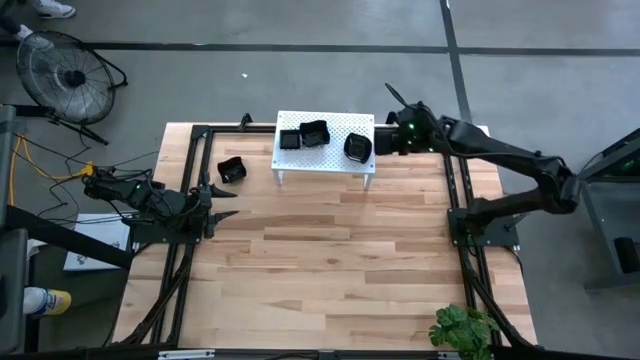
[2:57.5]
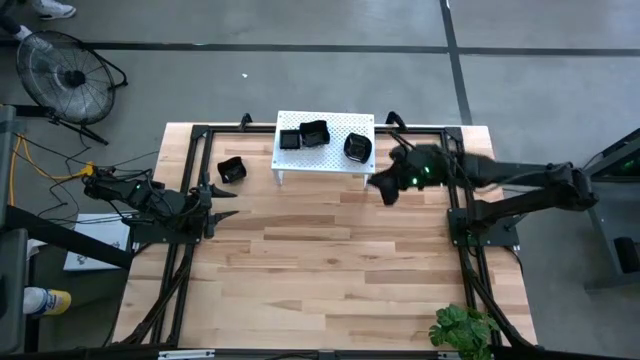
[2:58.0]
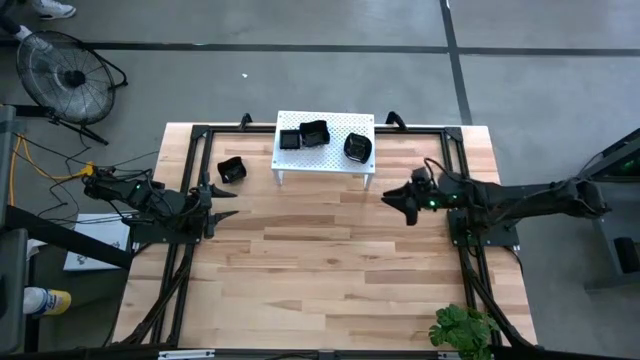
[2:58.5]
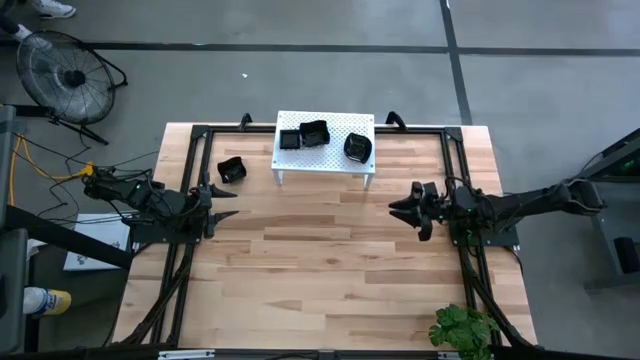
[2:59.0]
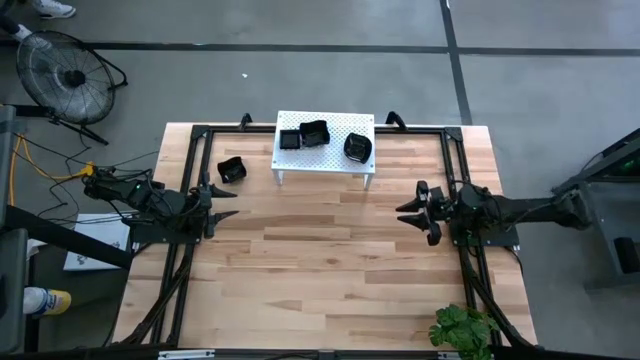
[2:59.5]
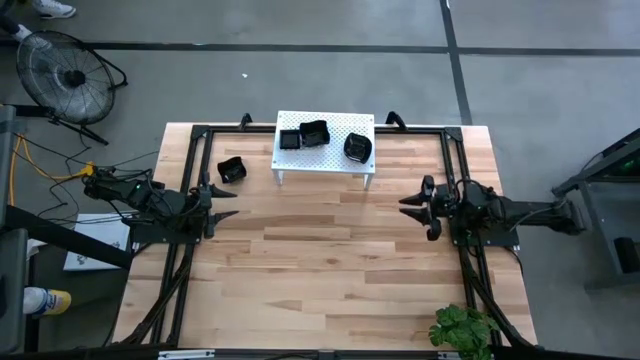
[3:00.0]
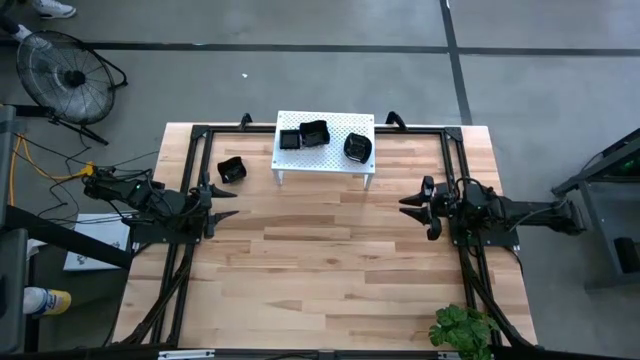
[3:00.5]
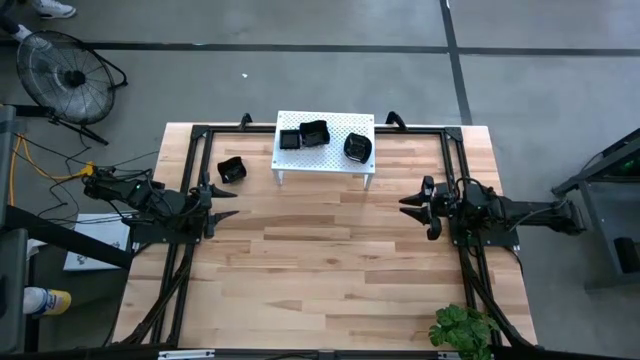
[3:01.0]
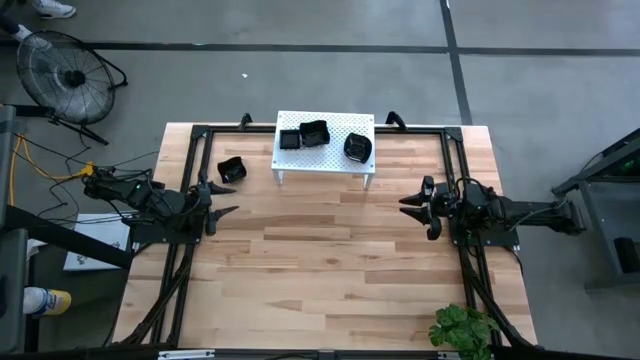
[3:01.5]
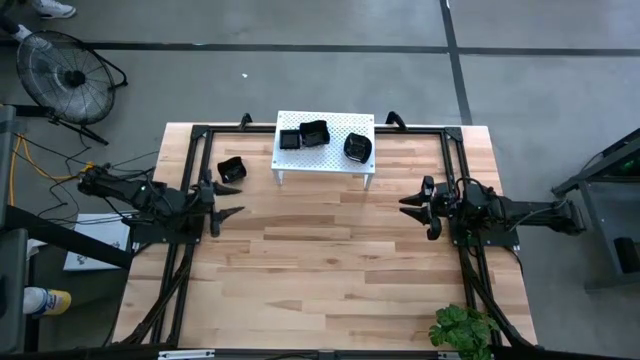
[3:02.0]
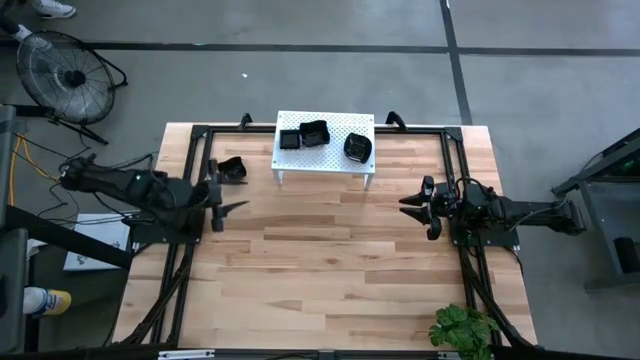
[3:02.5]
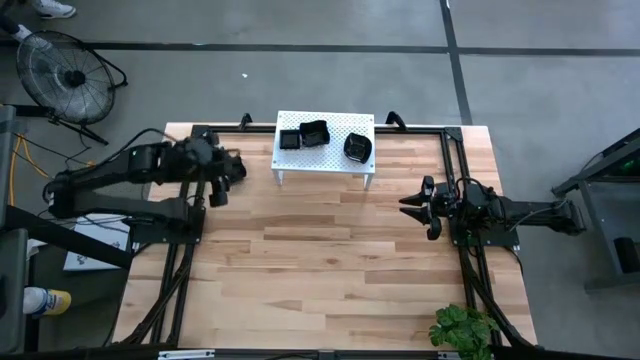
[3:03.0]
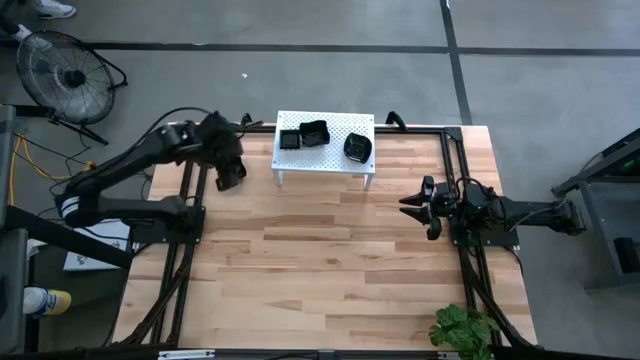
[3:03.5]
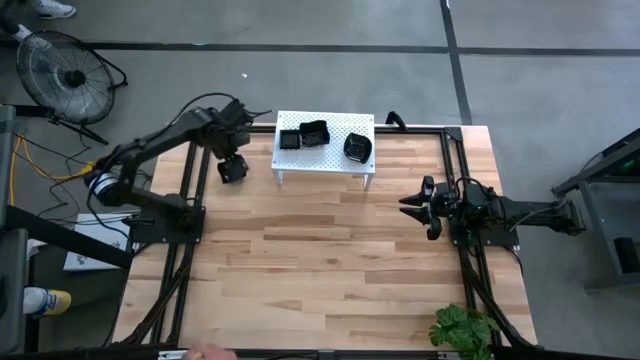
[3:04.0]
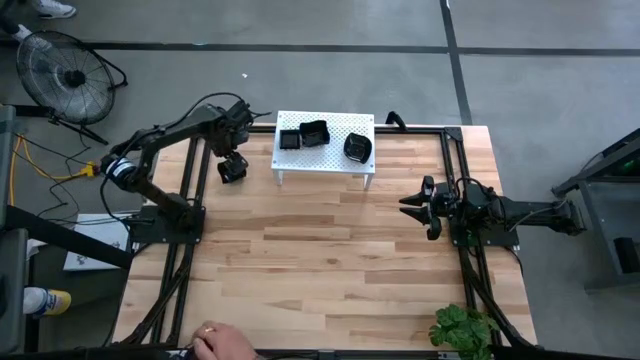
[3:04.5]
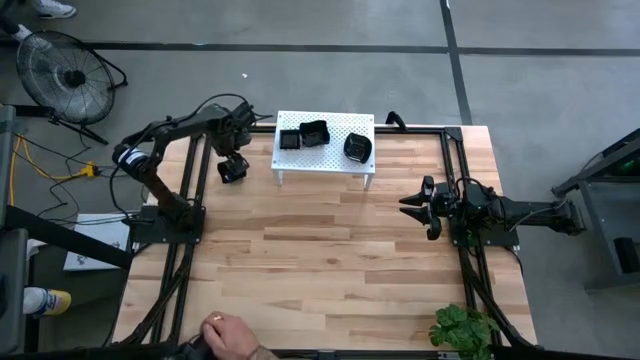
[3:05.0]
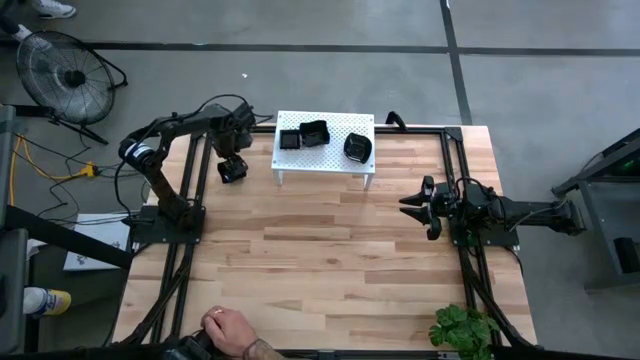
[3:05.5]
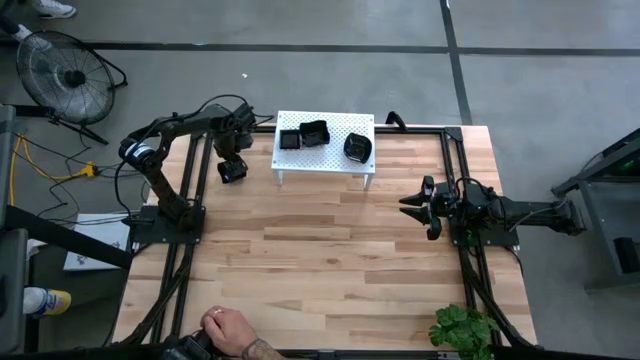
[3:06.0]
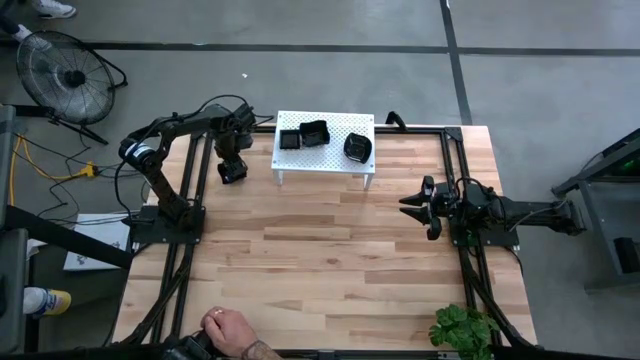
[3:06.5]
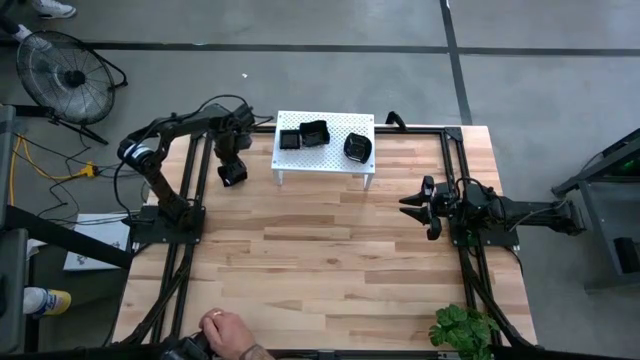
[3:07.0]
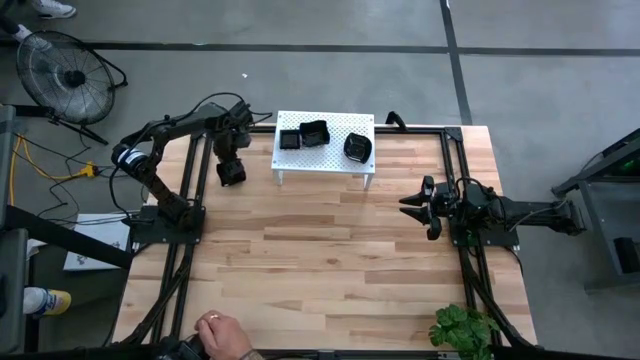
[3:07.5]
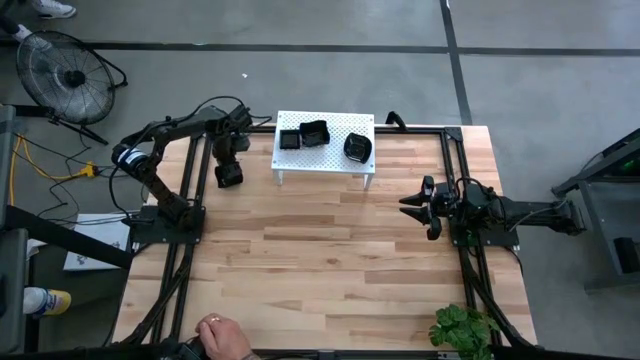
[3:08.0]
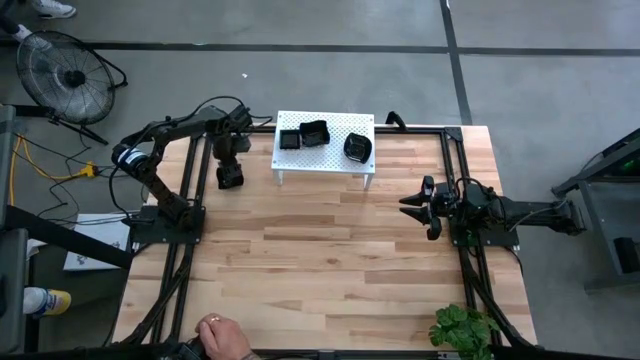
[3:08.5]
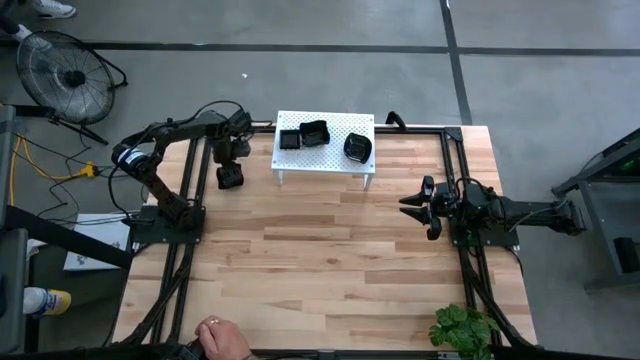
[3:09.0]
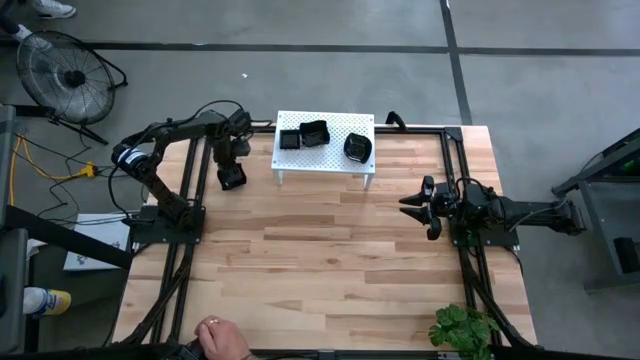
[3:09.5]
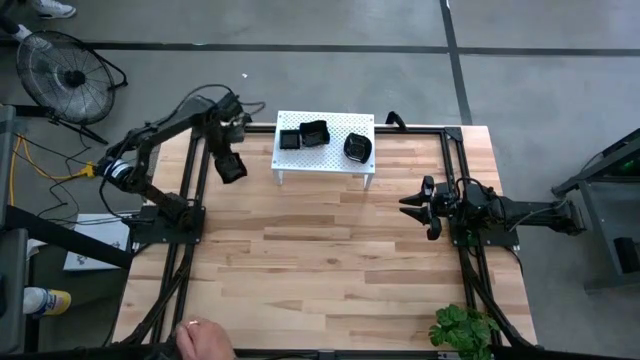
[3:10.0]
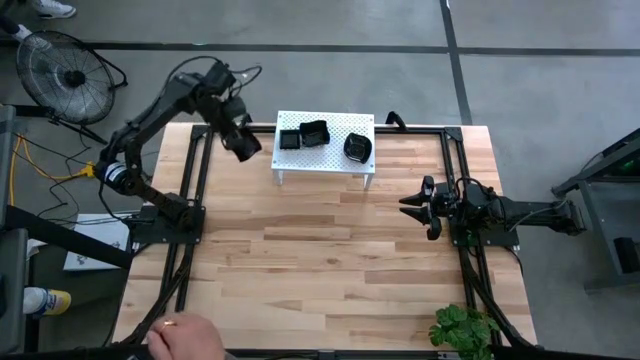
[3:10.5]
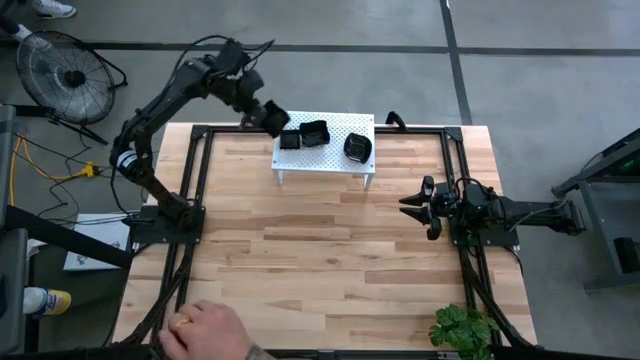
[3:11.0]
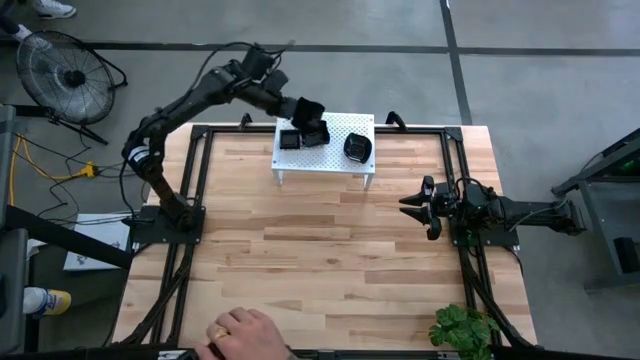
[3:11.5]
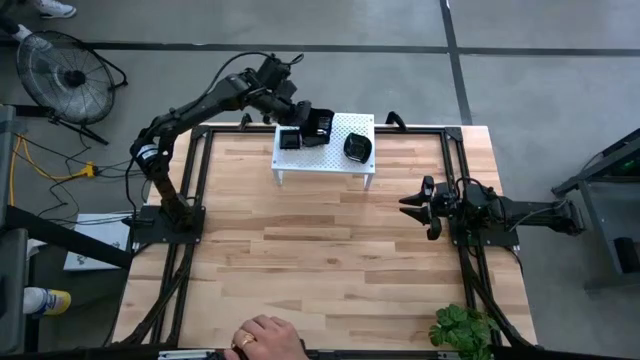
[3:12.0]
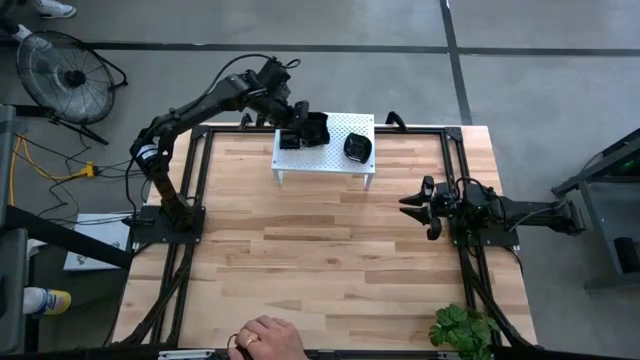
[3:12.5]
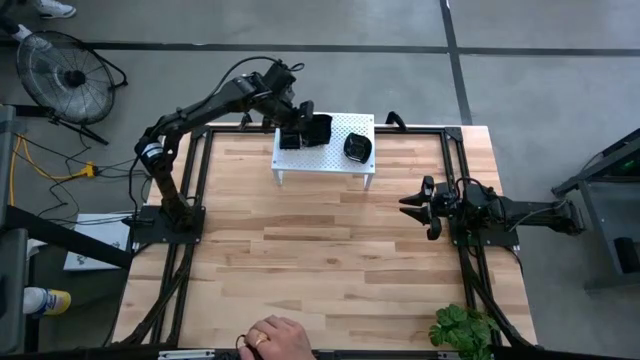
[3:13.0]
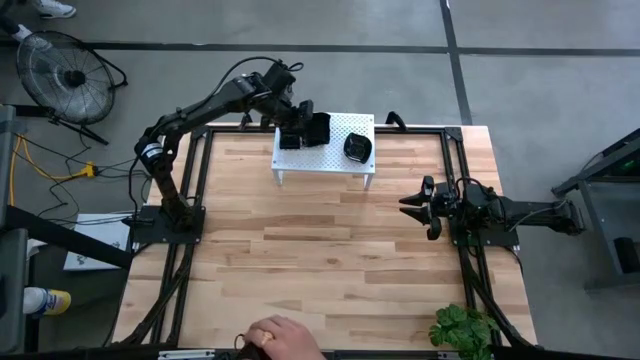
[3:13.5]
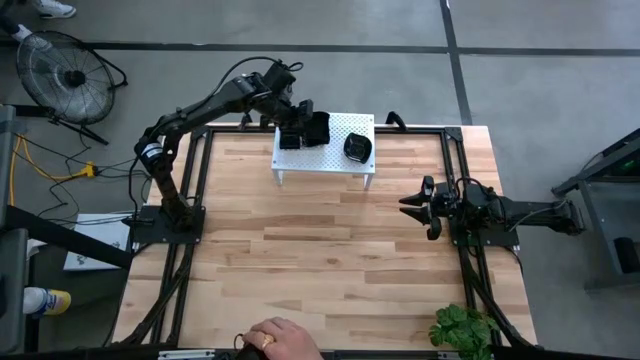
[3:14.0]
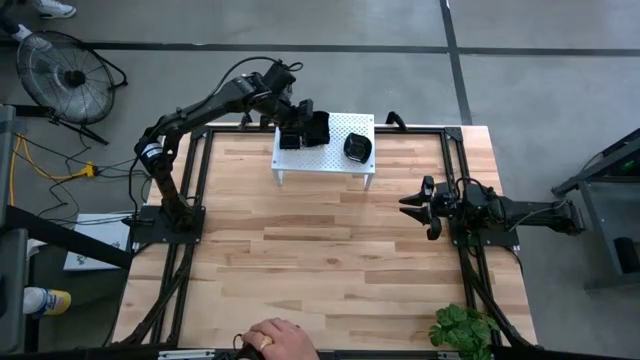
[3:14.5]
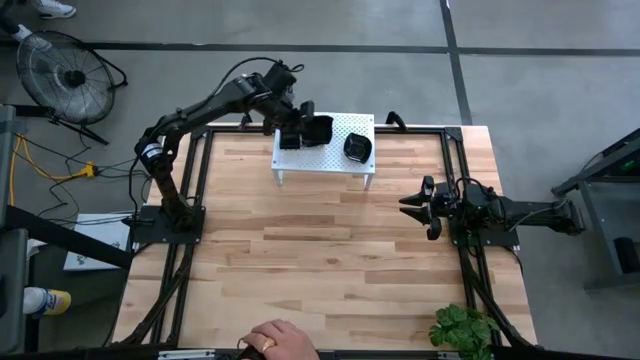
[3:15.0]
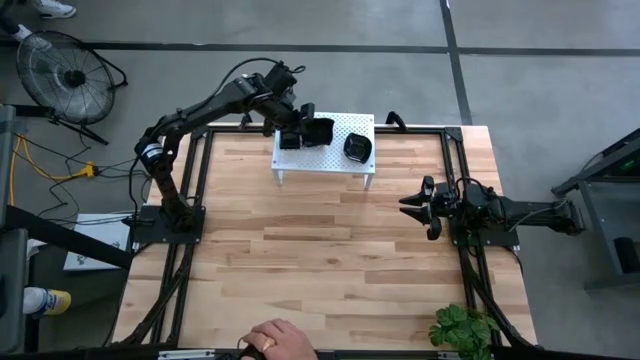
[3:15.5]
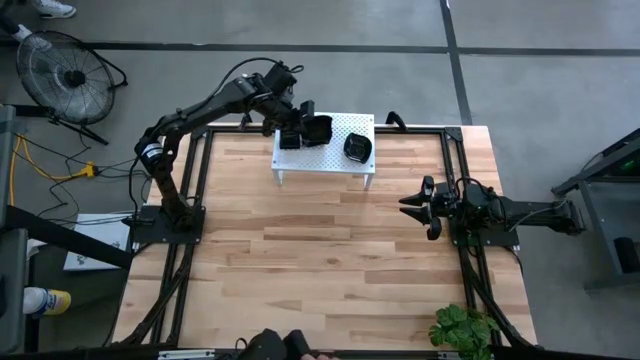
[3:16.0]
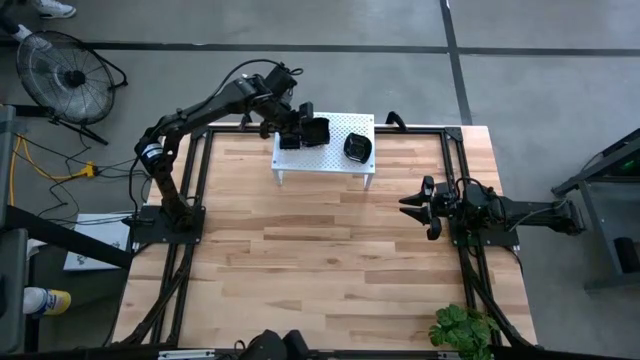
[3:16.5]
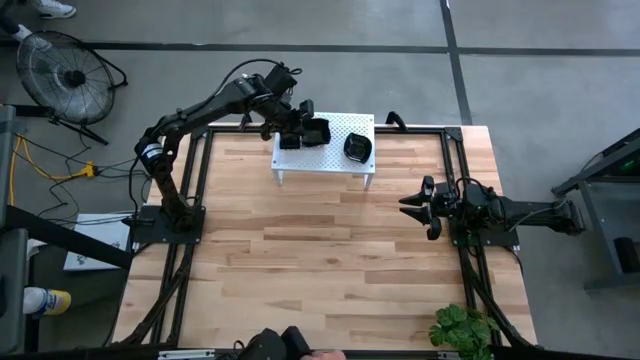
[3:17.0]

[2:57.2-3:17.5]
Task: Pick & Place Mini shaped plates
Stack the distorted square plate on top of the other distorted square plates on the shelf

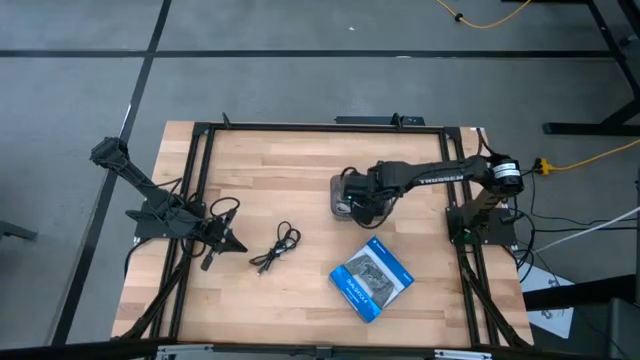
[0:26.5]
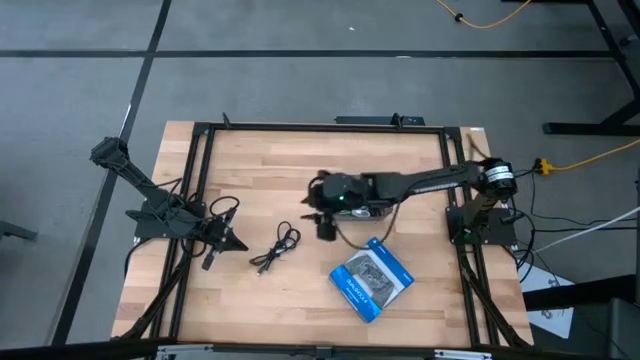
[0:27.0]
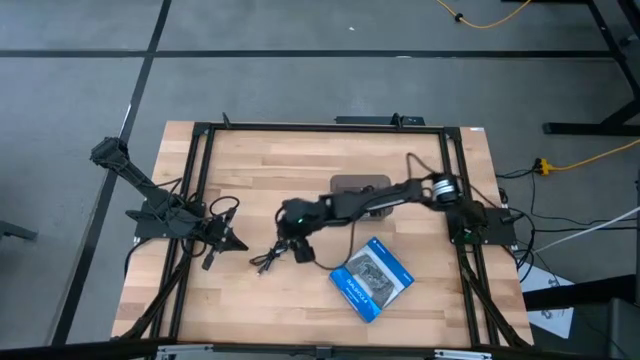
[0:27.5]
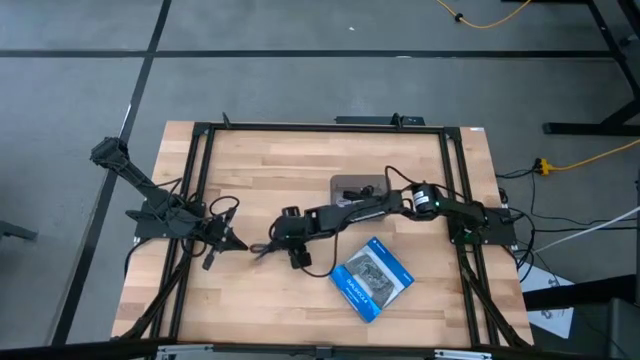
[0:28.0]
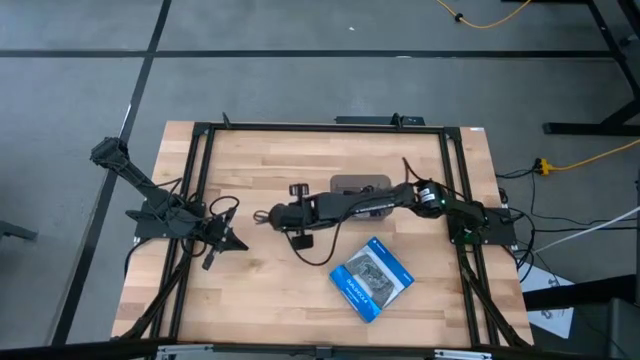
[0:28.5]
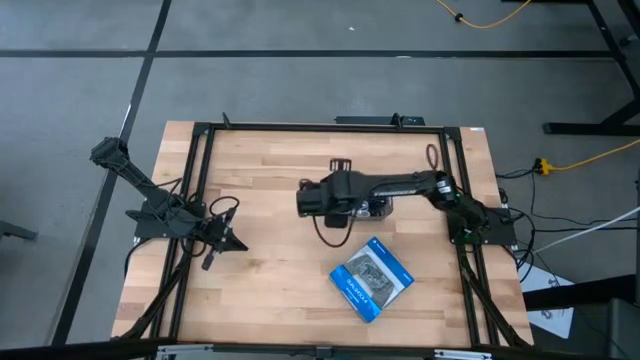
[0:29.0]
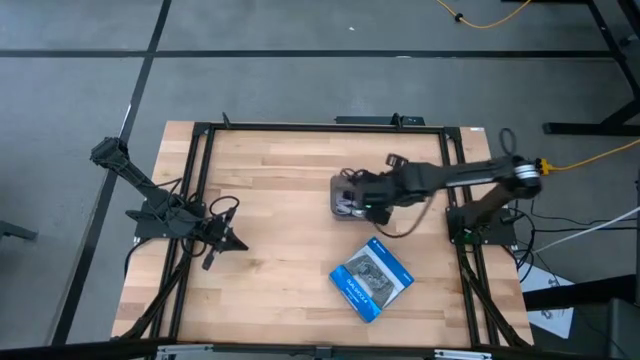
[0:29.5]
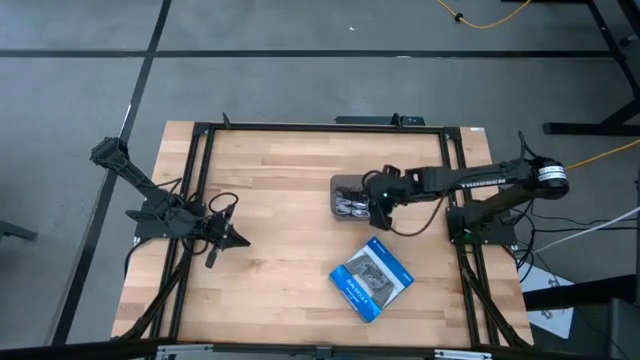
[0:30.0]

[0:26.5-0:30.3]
Task: Pick and place USB-C Cables
Put the black and white charger cable into the gray bin
